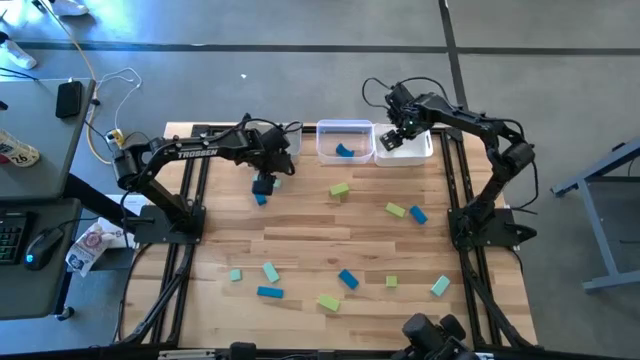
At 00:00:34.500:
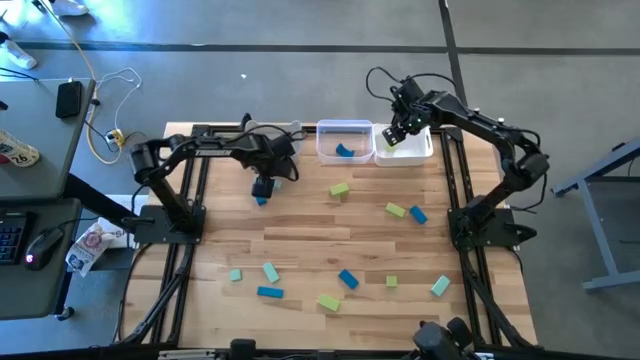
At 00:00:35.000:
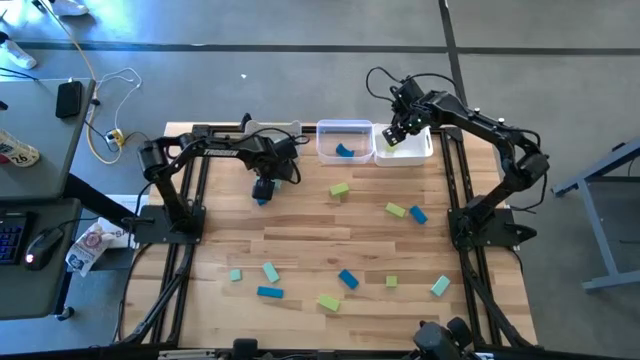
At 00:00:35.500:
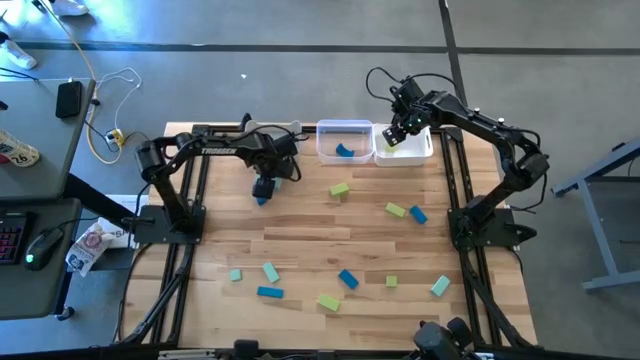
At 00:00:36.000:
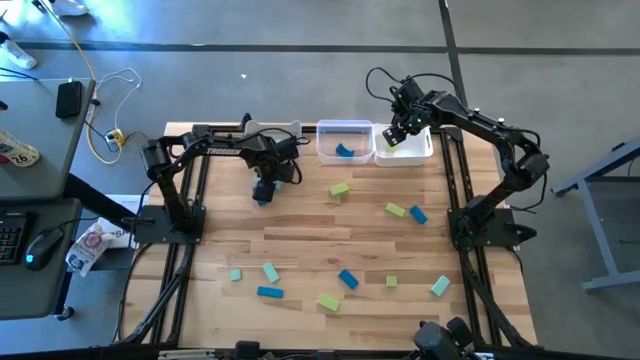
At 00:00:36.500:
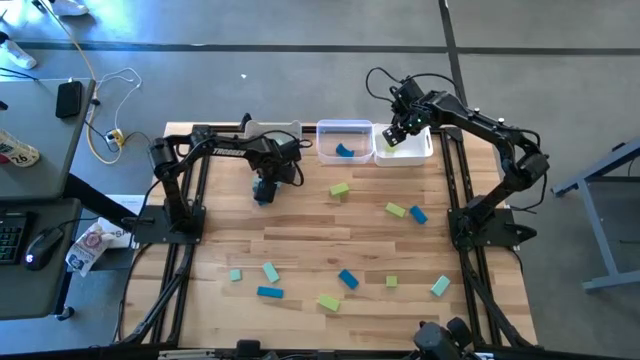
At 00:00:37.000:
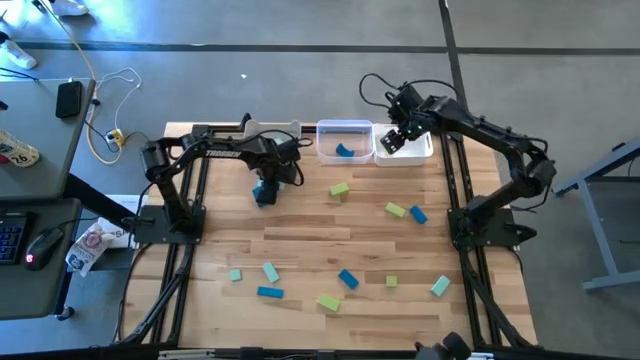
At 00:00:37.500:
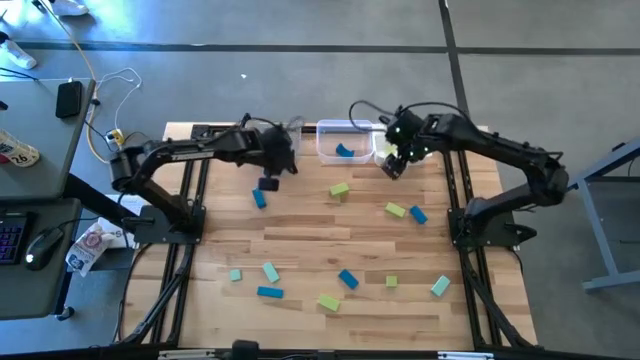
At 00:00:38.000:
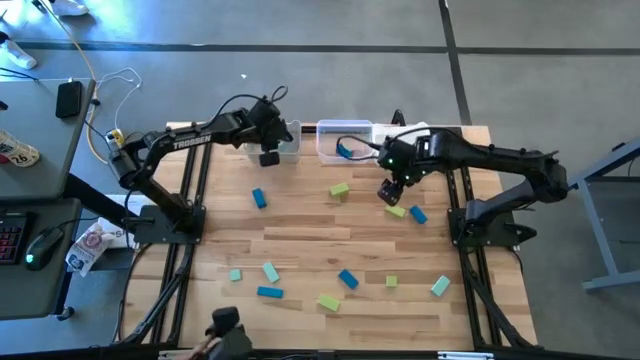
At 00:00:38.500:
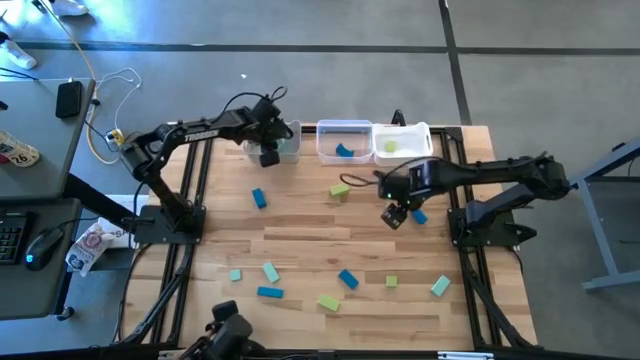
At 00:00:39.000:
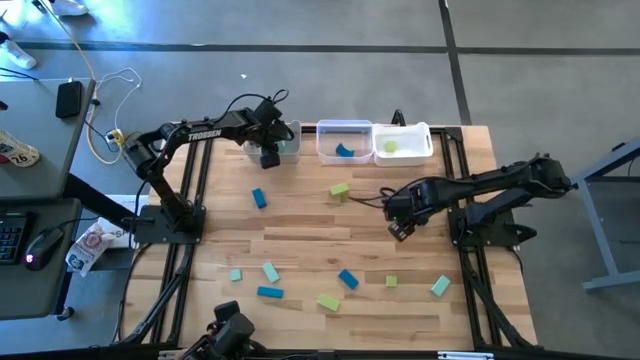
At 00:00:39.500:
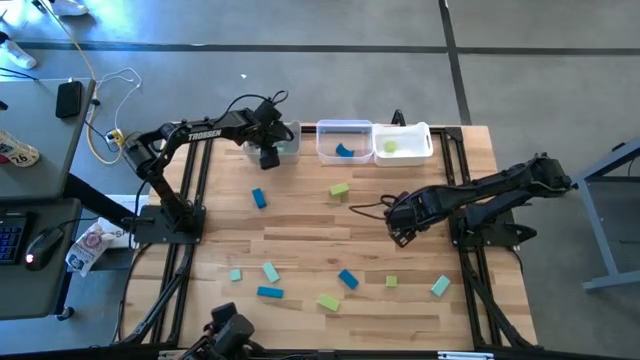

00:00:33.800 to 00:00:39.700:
Task: Sort & place blocks by color
Put the light blue block into the gray bin

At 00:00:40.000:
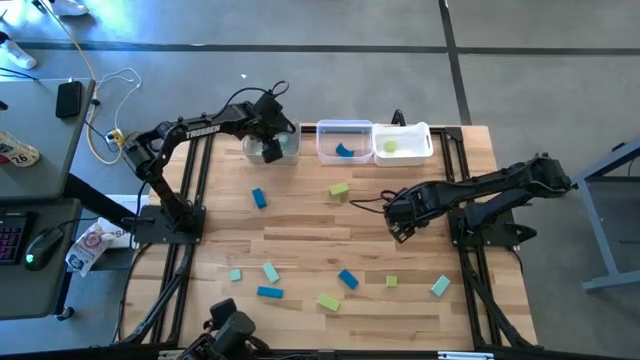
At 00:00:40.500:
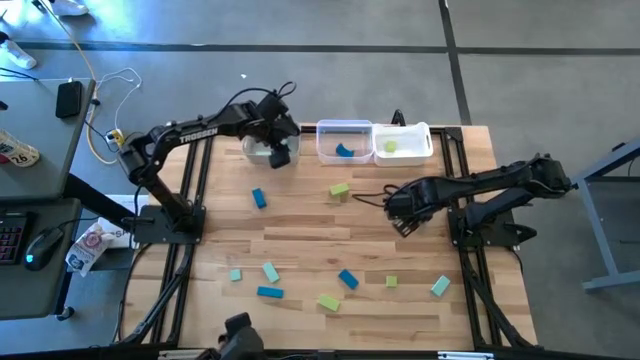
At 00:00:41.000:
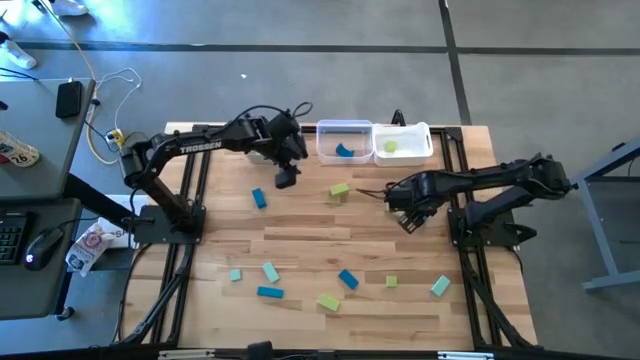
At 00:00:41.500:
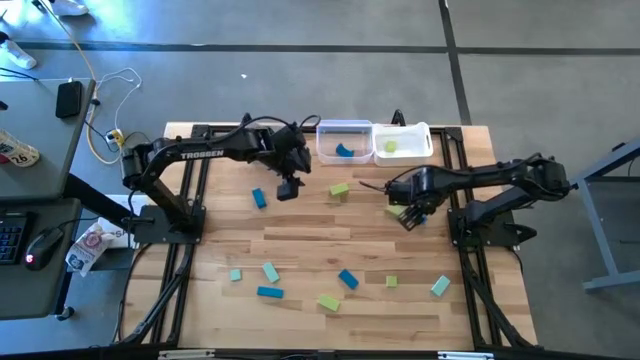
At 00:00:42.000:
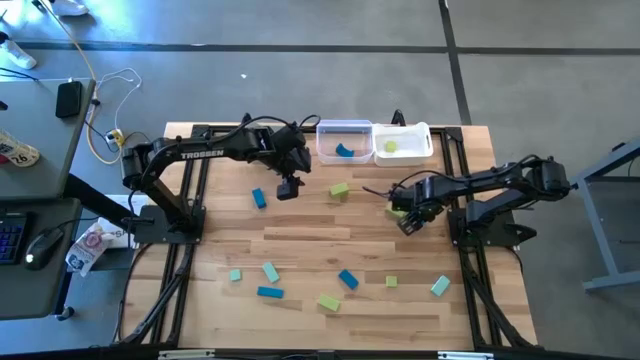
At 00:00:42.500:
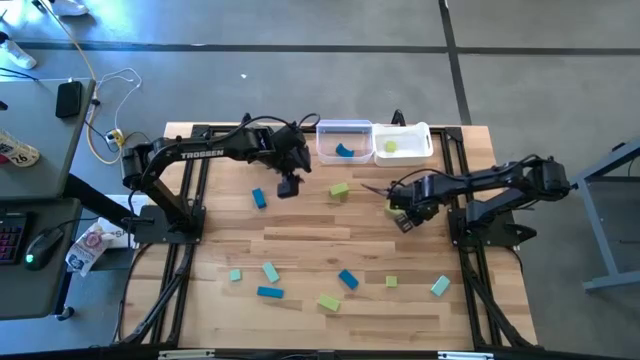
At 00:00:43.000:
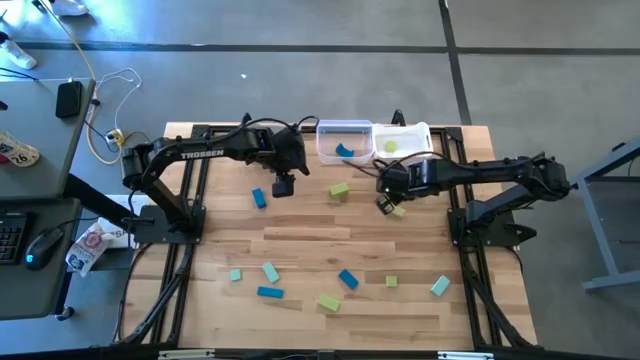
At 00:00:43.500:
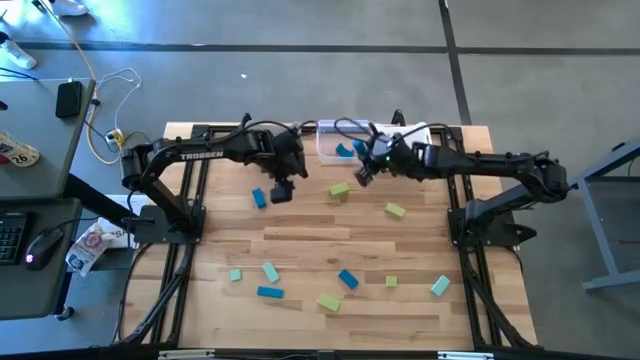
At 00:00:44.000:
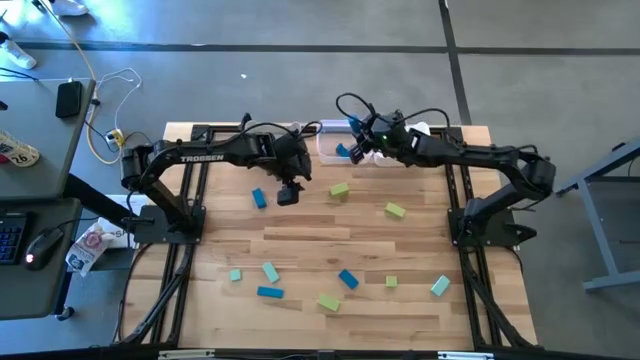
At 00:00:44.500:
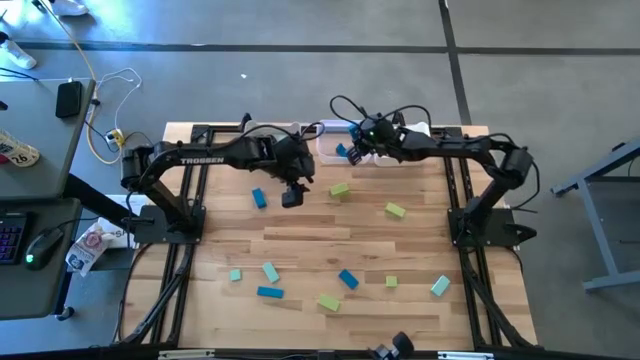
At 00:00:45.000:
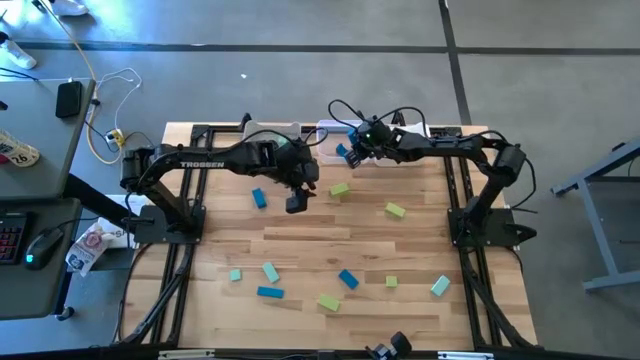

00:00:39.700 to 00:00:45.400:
Put the blue cylinder block into the transparent bin

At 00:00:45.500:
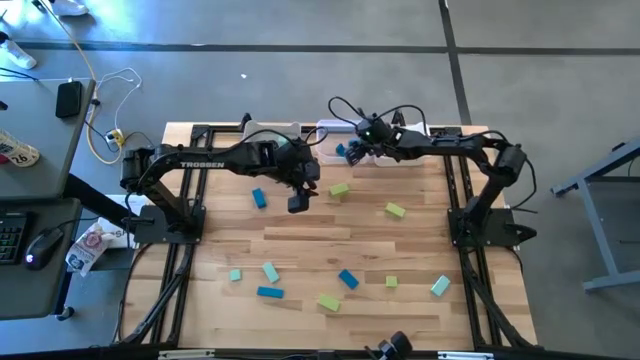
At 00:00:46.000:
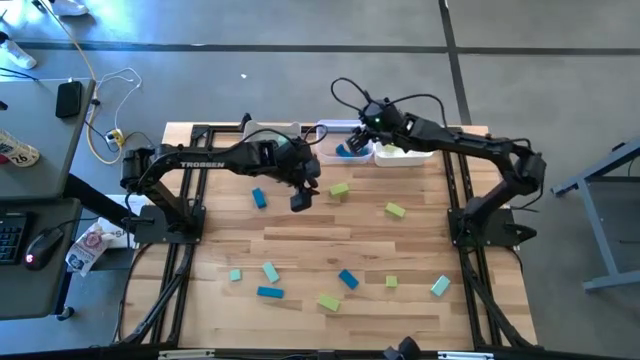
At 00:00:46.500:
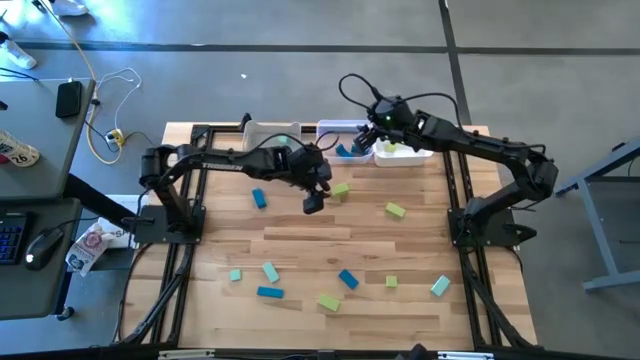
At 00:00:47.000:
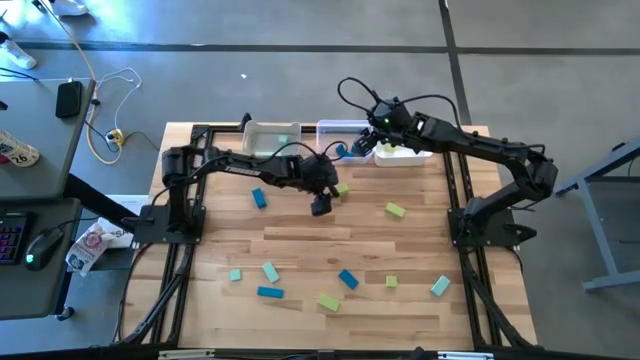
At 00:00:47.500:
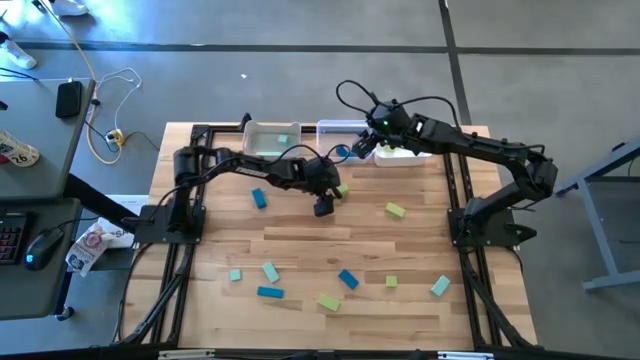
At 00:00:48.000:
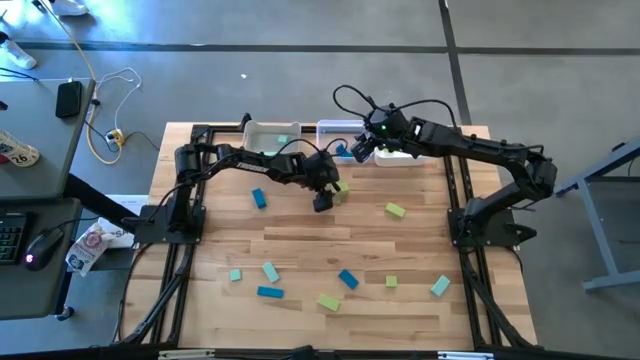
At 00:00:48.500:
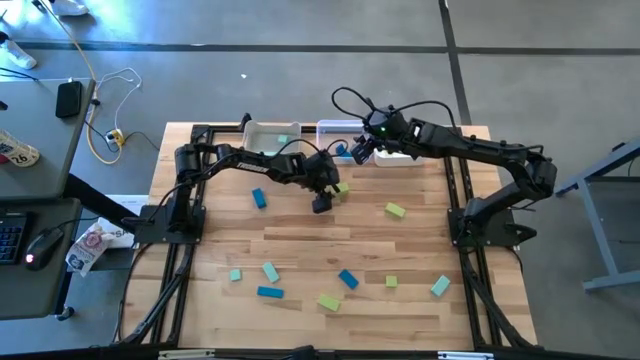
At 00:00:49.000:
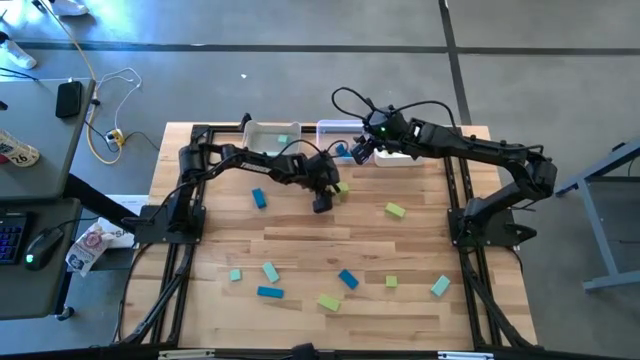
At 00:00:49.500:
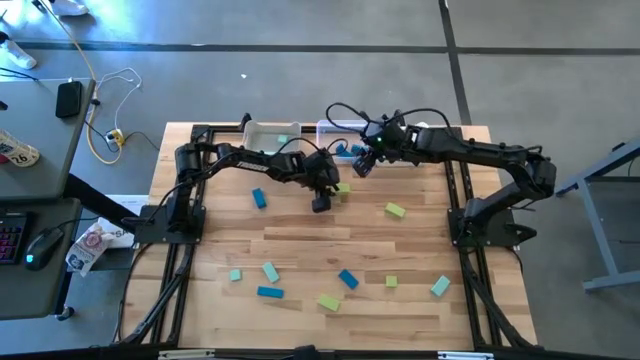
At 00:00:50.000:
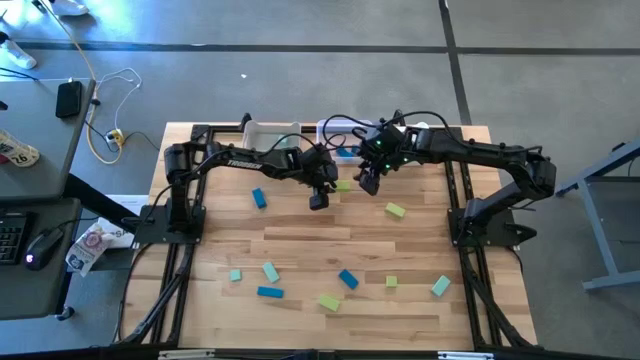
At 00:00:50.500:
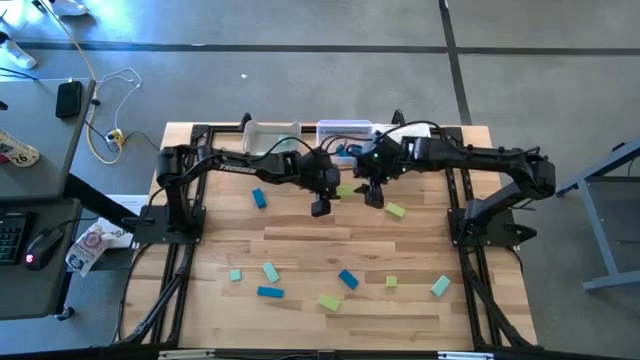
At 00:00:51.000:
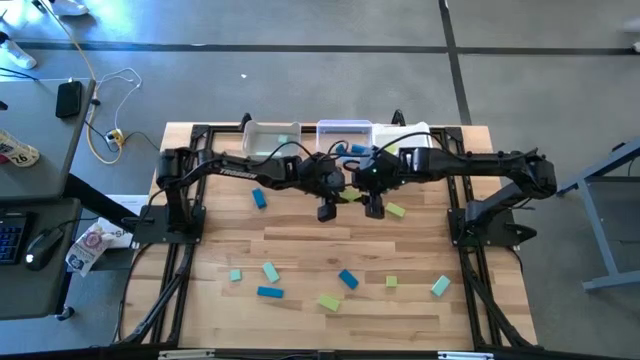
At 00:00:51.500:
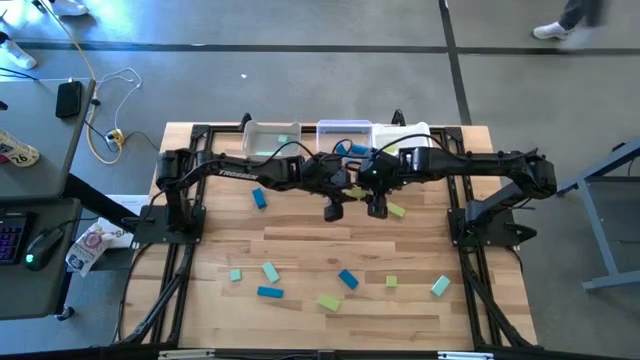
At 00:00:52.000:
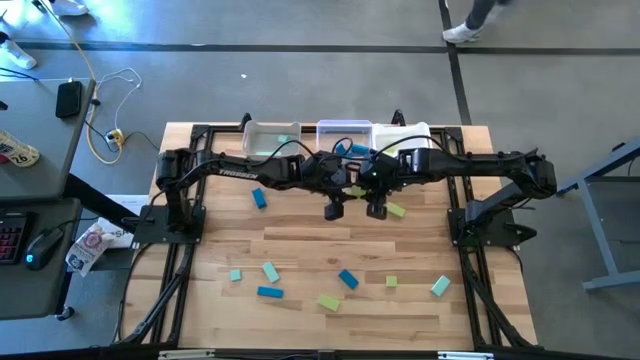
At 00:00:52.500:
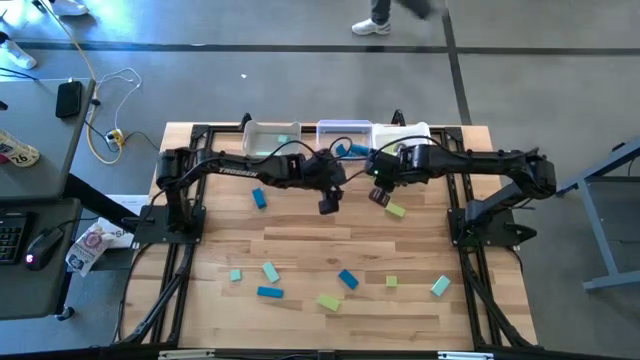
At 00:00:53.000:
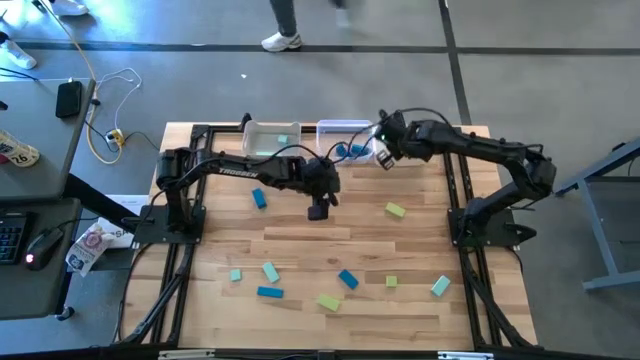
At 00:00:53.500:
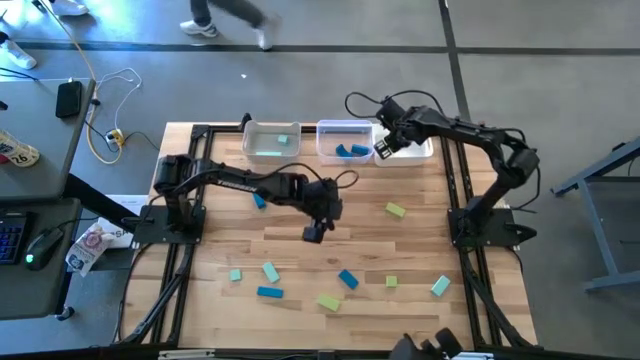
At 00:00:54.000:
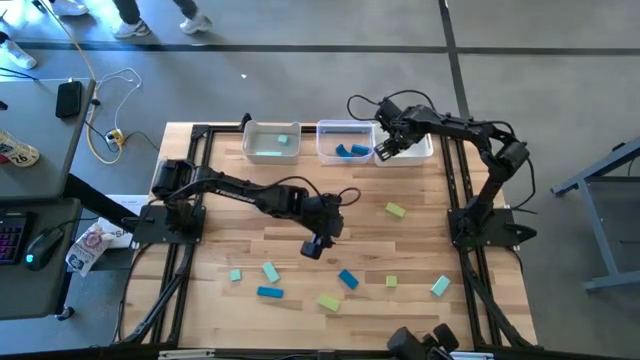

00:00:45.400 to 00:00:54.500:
Put the green block into the white bin
